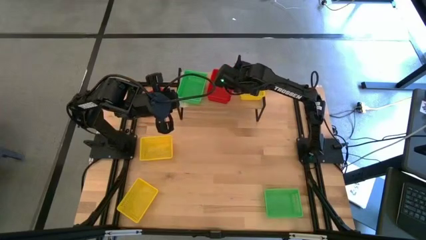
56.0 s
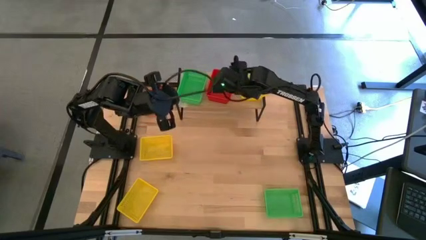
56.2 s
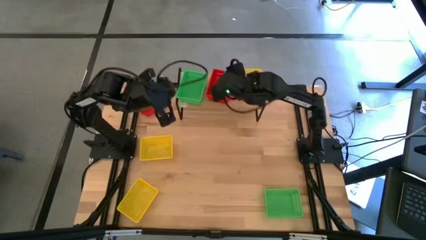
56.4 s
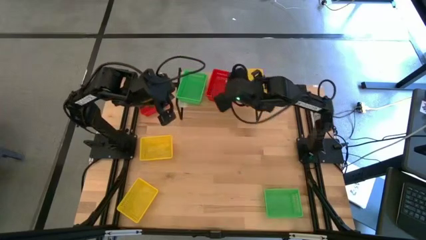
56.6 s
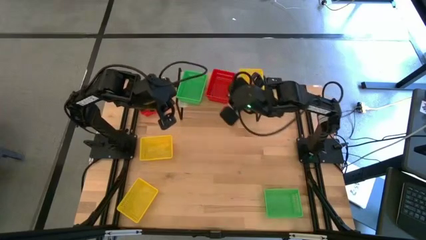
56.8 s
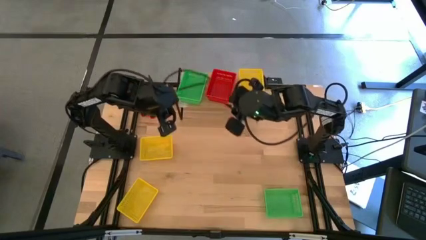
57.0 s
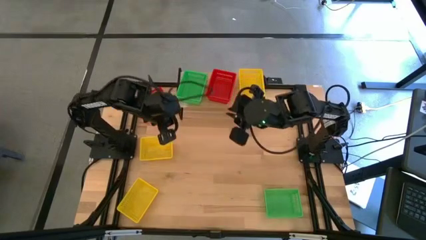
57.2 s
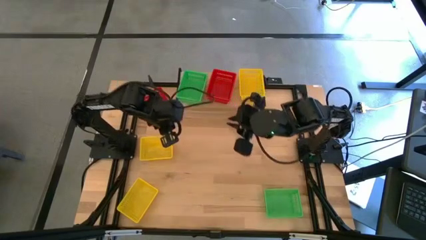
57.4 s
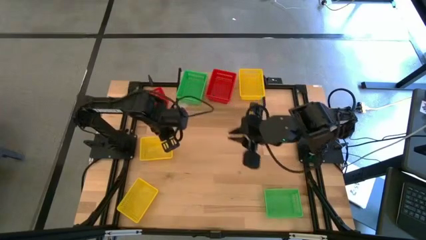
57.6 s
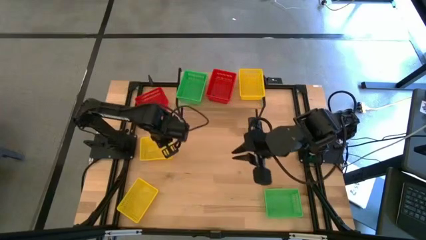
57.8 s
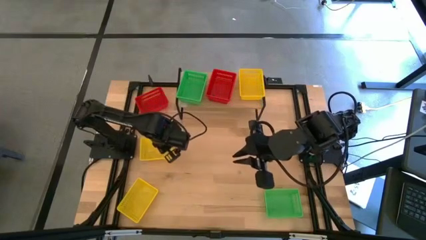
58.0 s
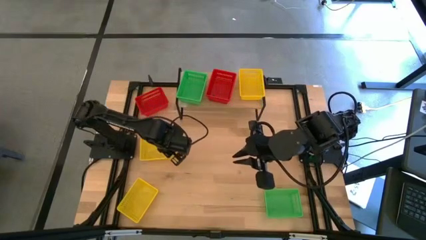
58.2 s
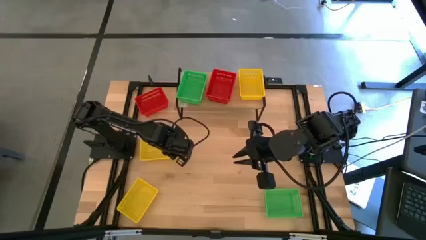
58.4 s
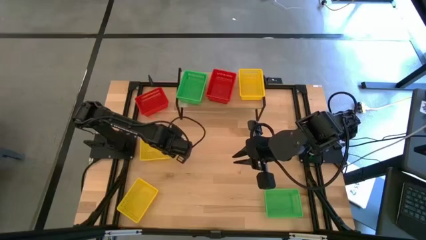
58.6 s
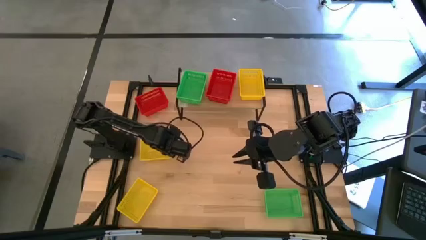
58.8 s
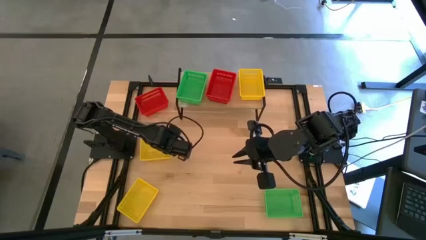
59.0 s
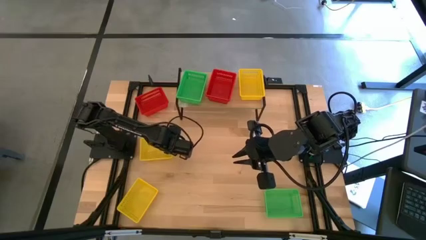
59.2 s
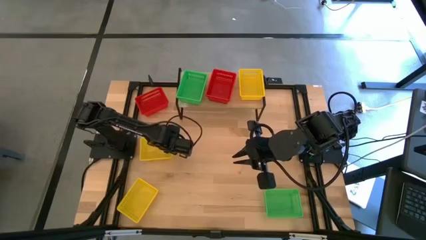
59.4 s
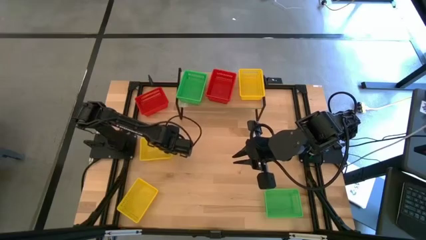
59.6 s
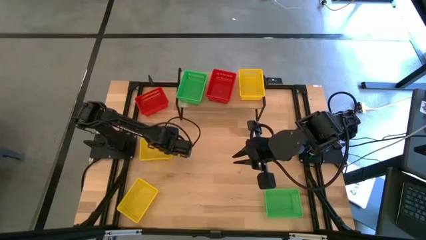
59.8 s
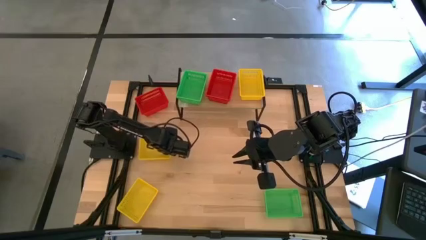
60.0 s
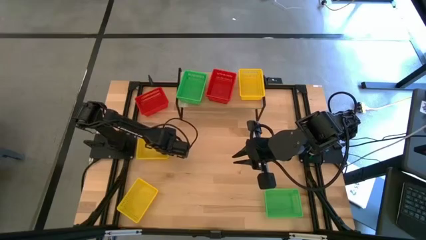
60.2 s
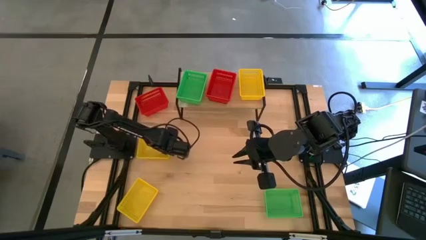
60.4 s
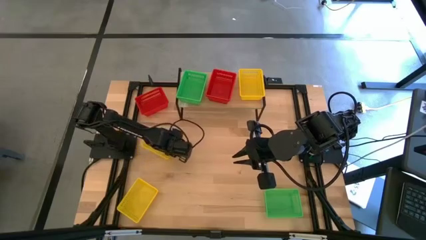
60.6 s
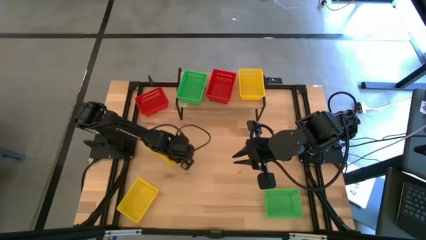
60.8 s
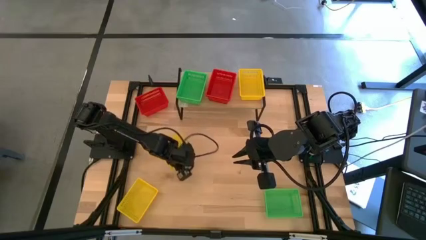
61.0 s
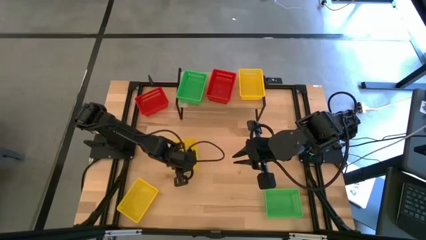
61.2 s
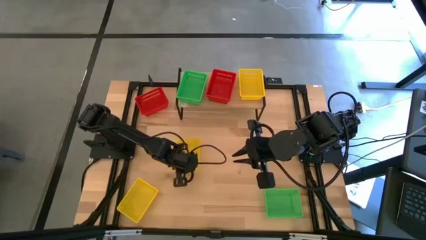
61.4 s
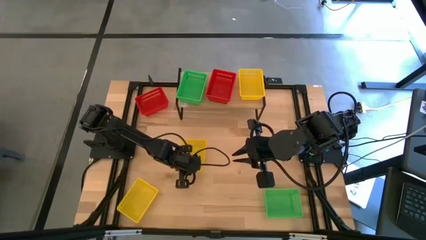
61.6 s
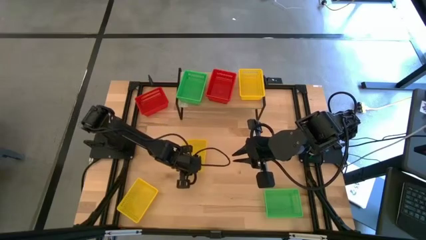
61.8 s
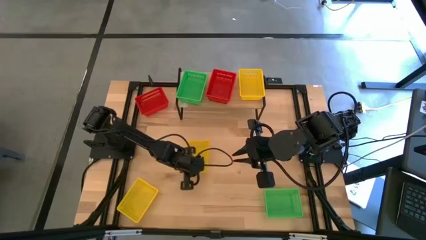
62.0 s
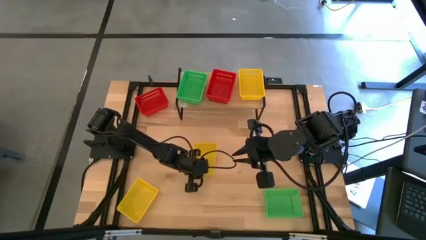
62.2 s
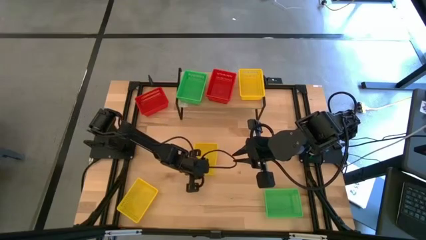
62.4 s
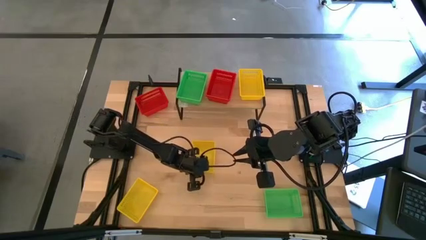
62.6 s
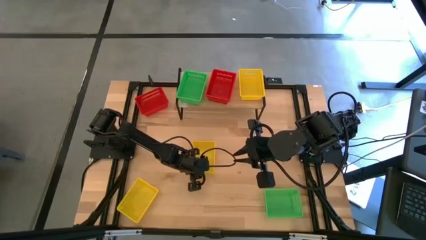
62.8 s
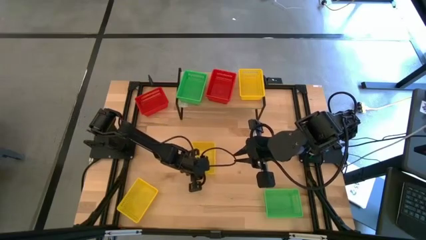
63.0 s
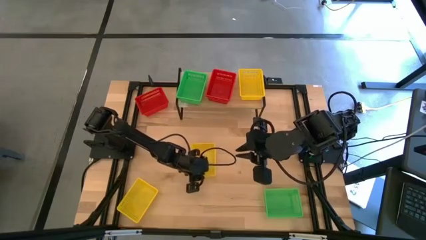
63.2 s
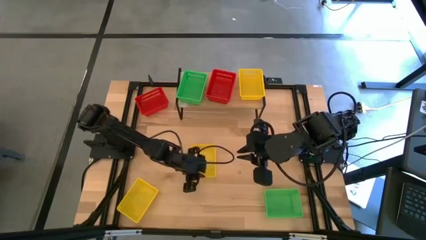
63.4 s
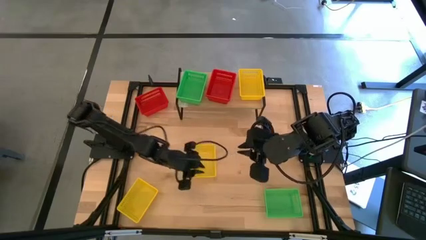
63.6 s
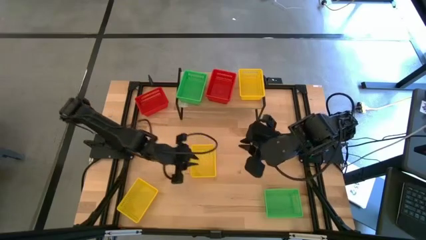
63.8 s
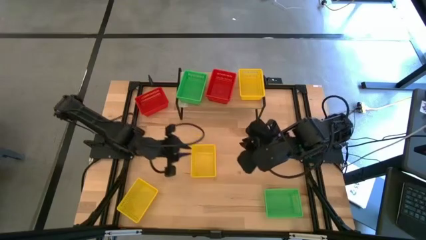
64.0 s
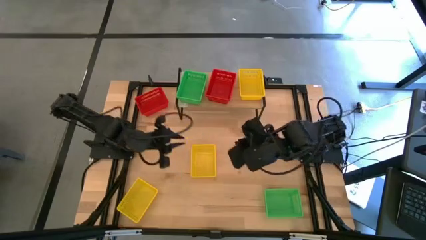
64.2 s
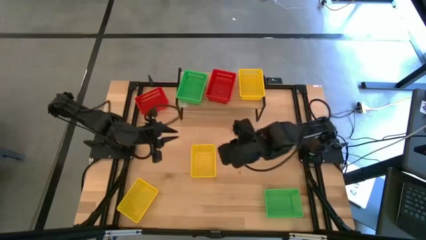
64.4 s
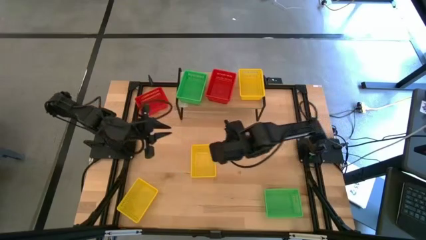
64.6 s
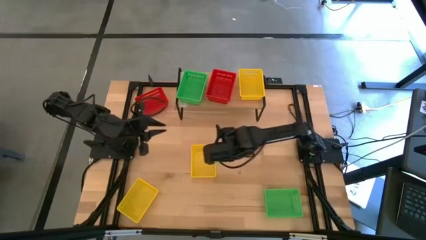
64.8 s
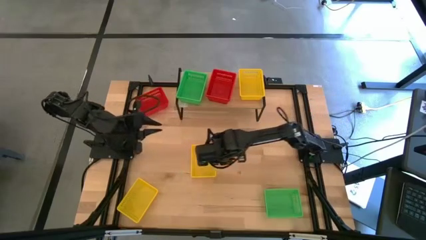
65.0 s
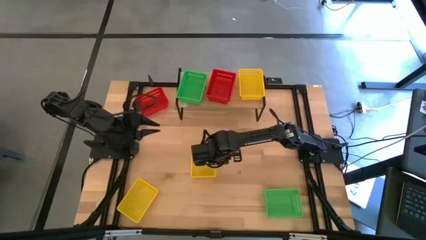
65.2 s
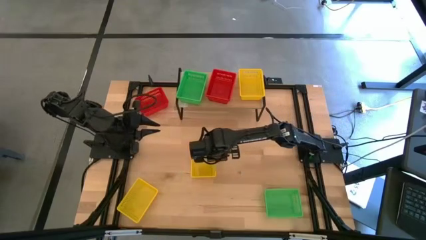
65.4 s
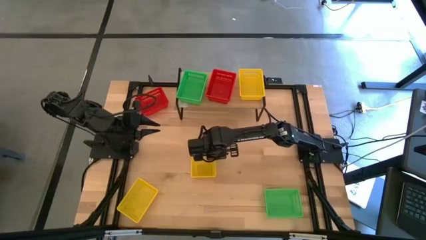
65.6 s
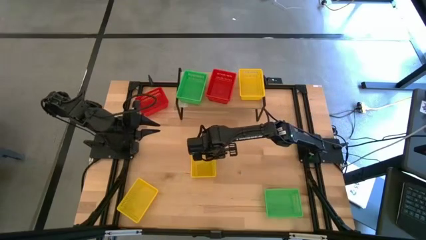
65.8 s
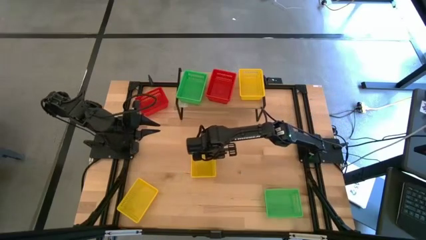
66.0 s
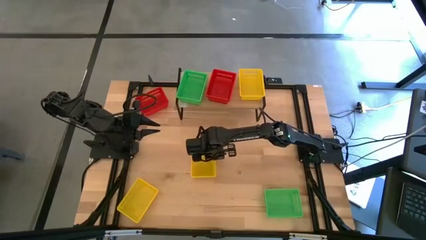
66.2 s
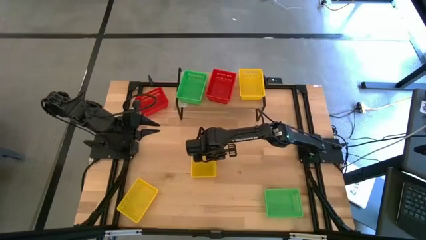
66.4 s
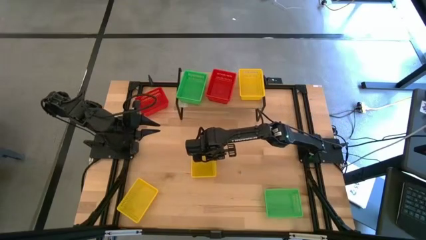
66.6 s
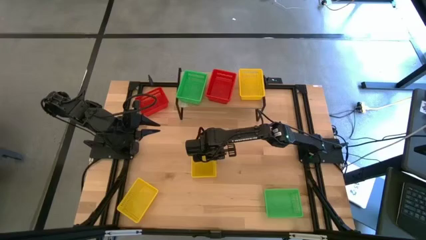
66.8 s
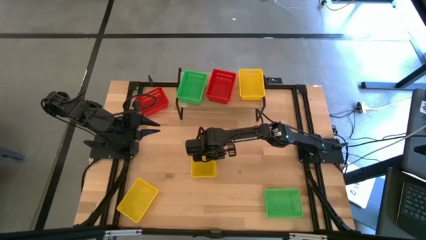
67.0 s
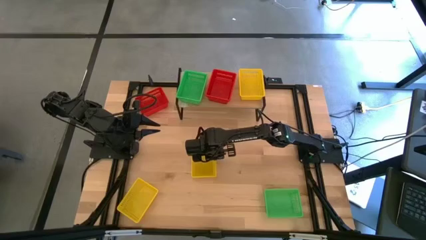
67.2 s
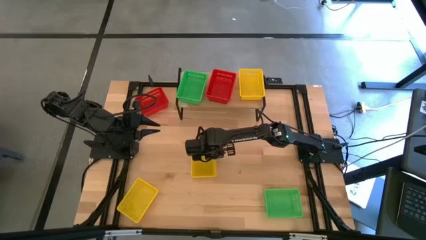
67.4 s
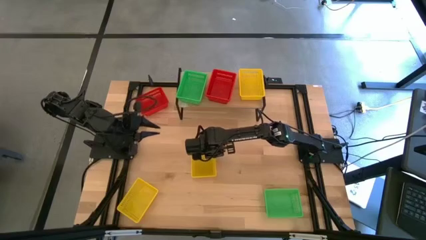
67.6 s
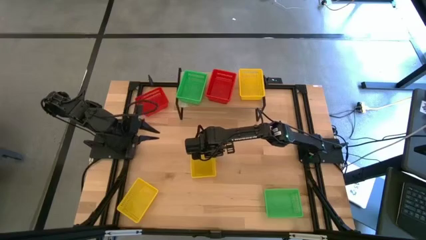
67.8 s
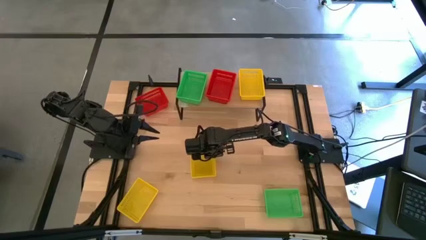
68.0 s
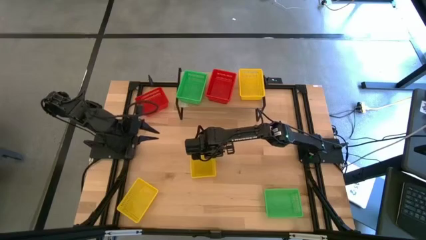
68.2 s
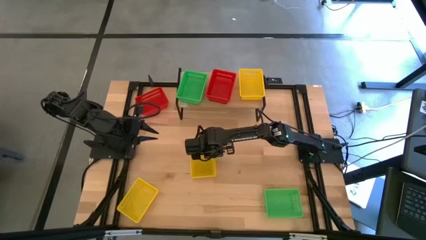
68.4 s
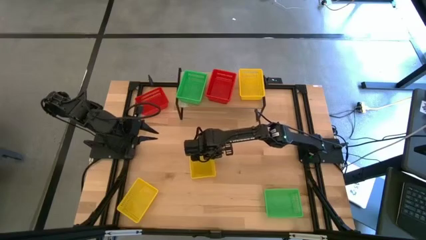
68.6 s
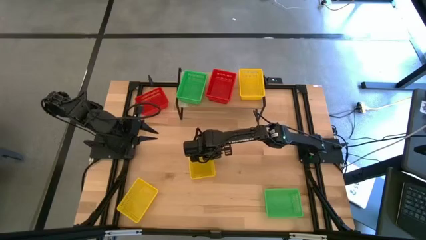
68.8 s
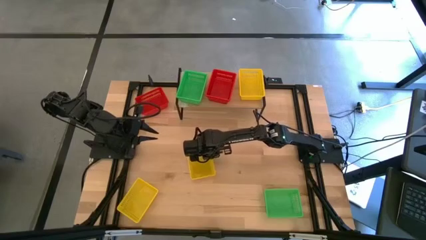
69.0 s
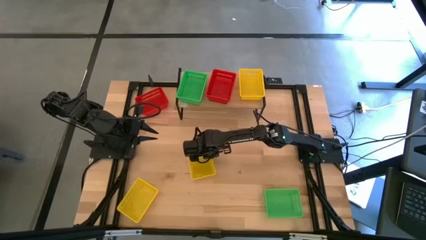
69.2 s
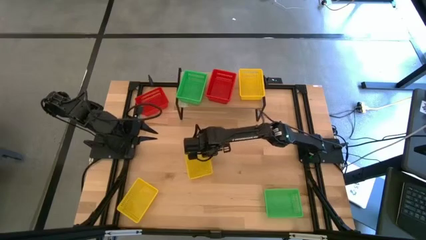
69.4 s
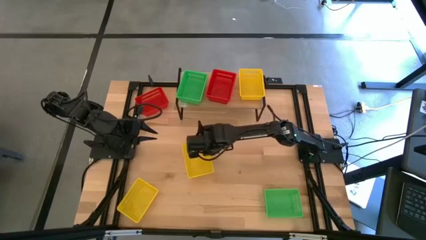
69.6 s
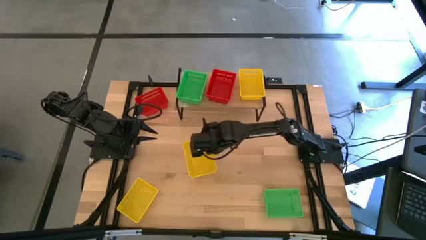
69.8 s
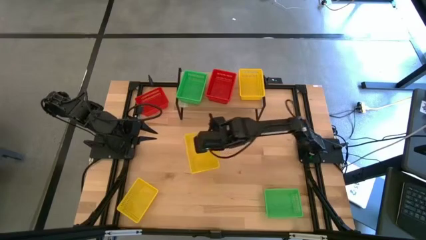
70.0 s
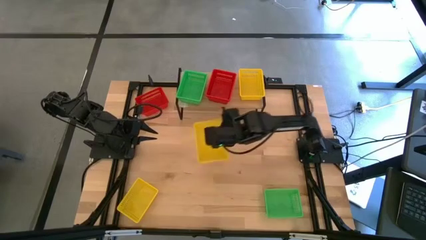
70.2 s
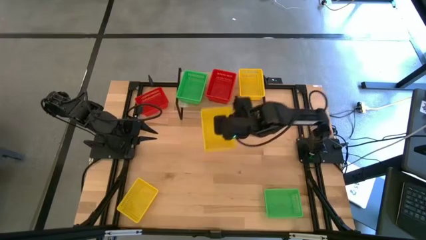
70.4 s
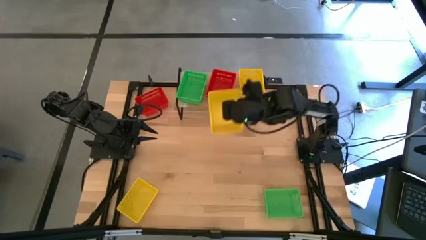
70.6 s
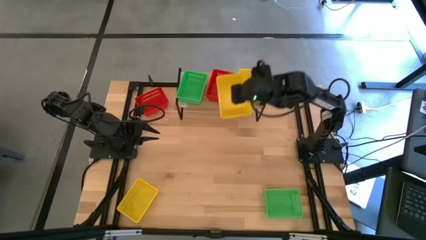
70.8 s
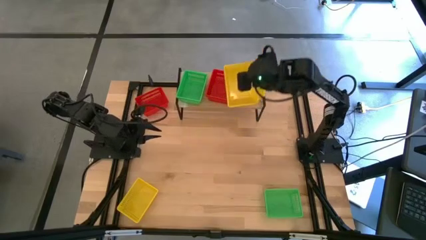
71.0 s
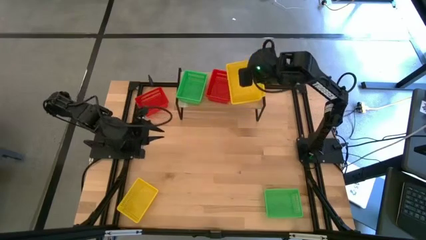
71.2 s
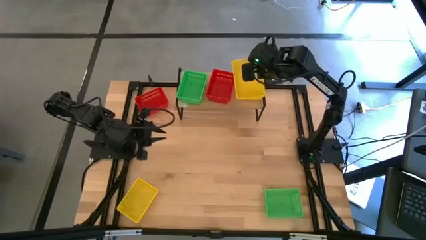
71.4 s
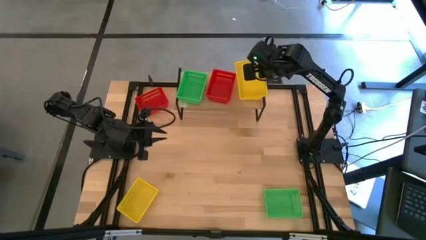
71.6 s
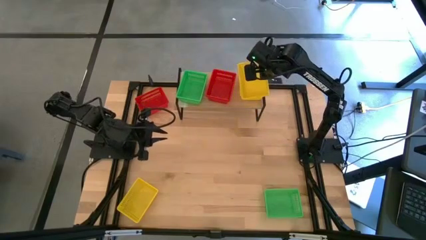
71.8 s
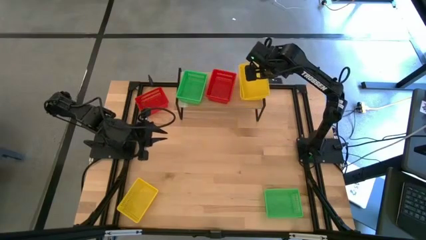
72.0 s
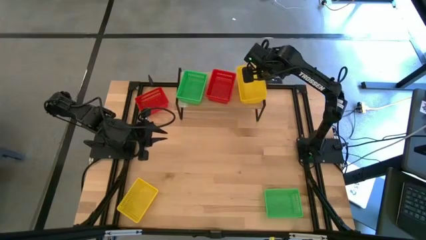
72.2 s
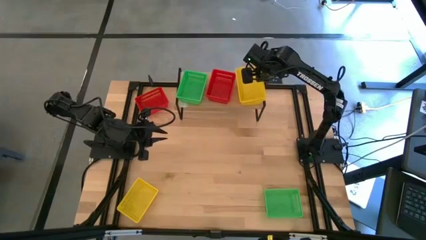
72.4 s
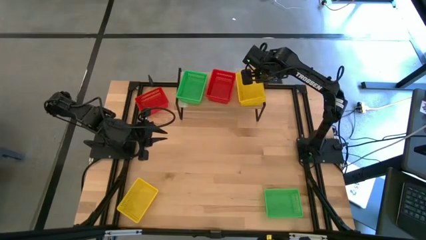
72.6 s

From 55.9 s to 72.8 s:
Task: Stack baskets on shelf by color
Stack the top yellow bin on top of the yellow bin on the shelf
